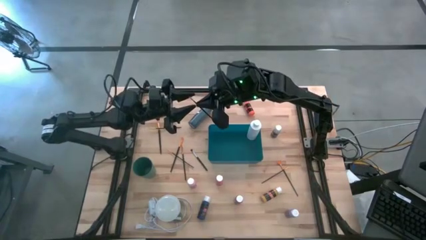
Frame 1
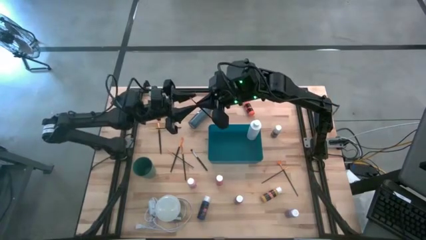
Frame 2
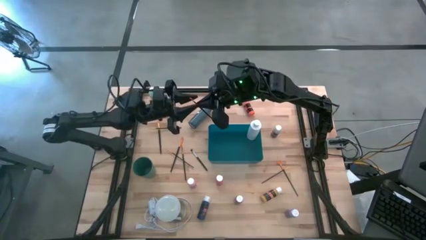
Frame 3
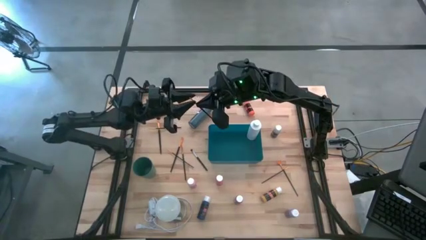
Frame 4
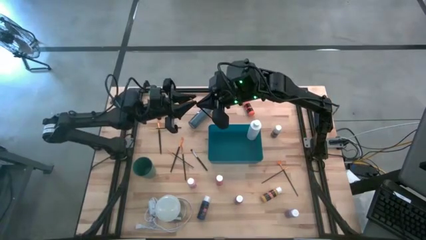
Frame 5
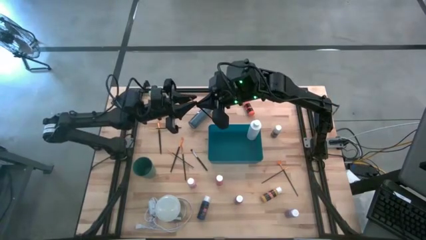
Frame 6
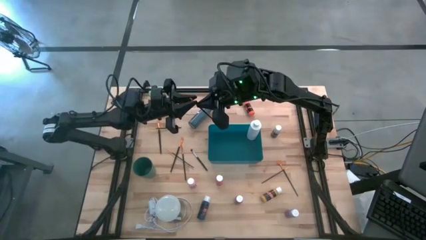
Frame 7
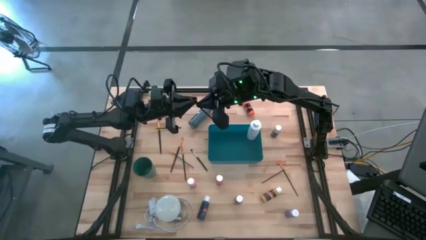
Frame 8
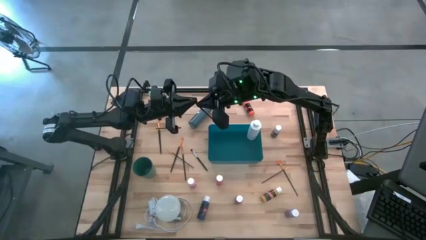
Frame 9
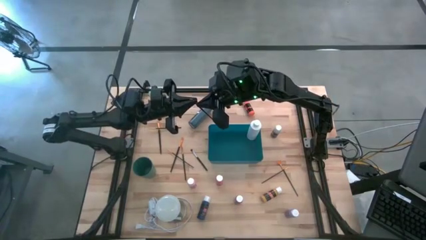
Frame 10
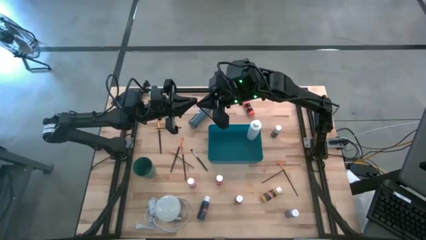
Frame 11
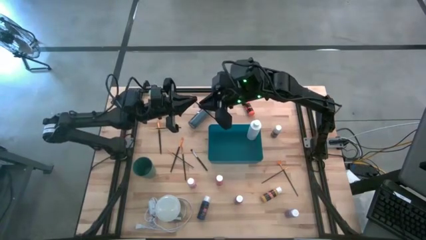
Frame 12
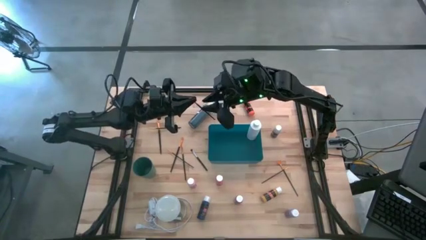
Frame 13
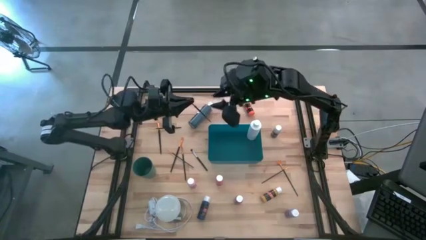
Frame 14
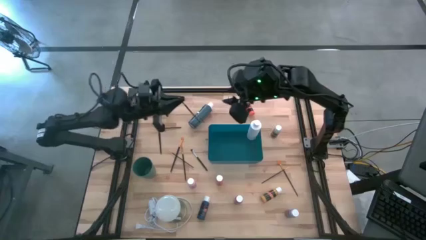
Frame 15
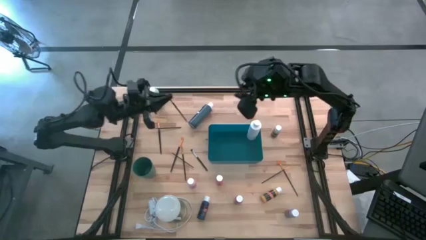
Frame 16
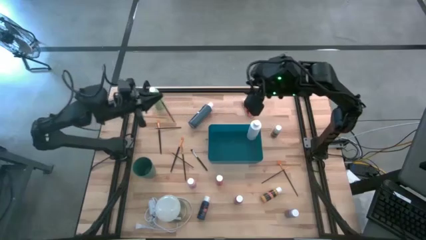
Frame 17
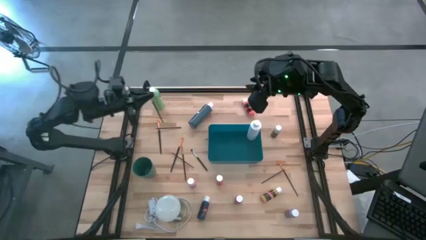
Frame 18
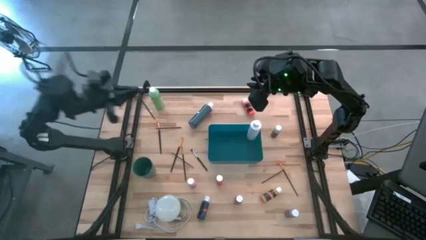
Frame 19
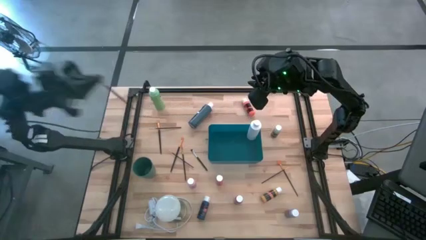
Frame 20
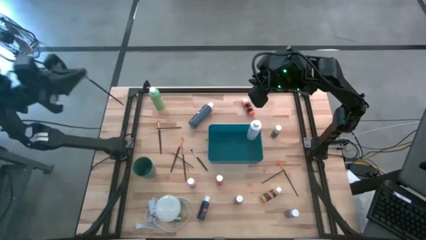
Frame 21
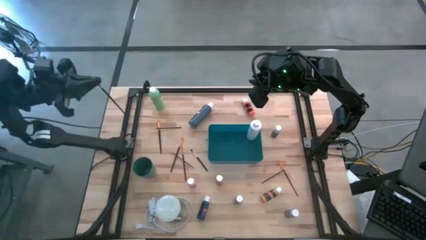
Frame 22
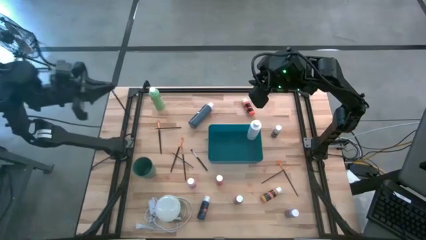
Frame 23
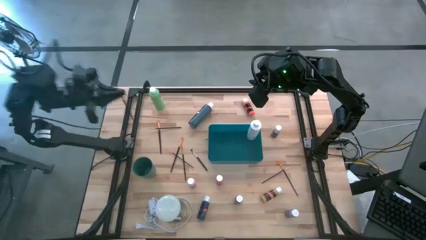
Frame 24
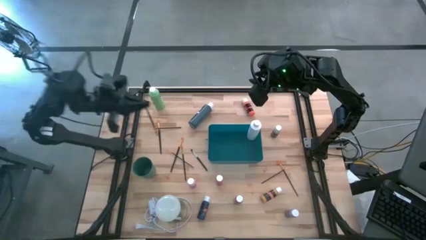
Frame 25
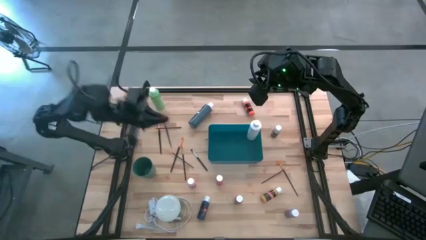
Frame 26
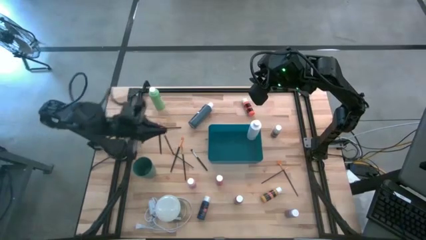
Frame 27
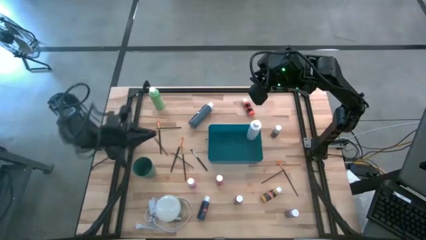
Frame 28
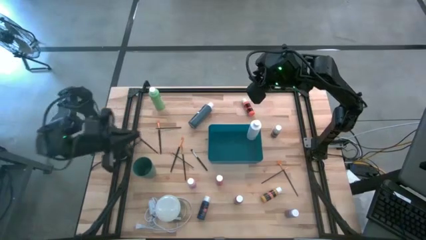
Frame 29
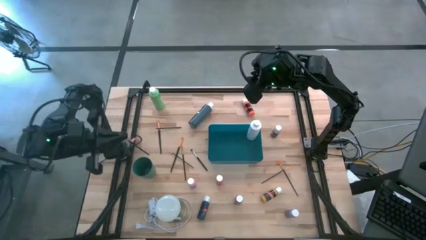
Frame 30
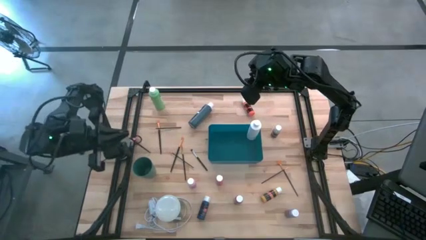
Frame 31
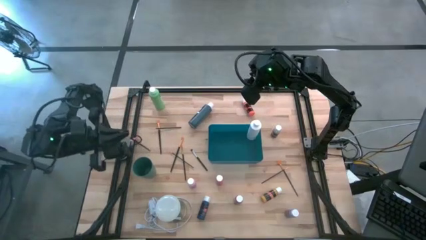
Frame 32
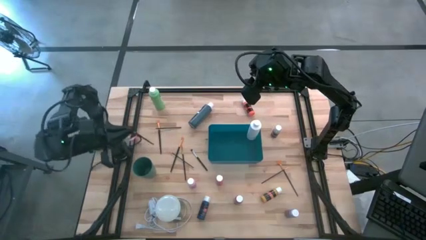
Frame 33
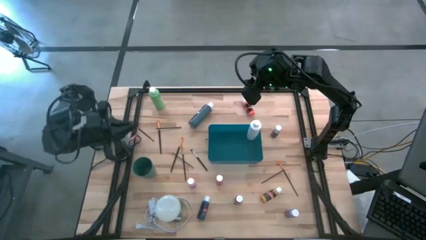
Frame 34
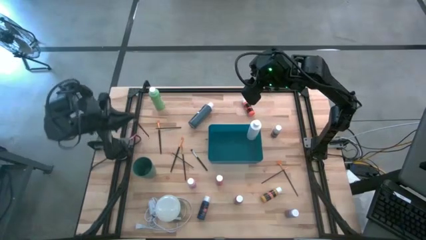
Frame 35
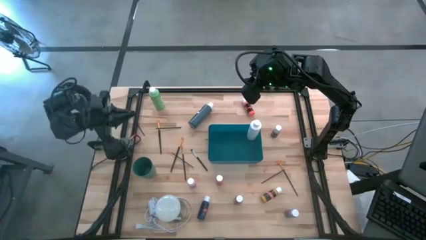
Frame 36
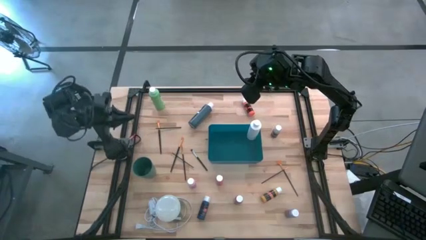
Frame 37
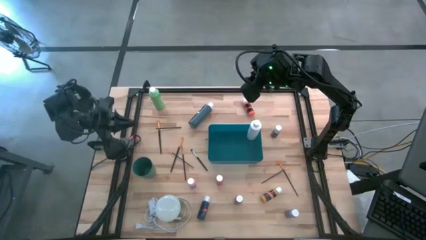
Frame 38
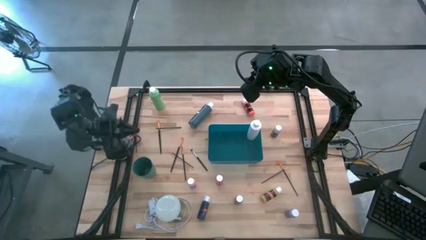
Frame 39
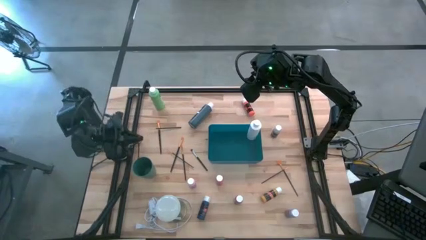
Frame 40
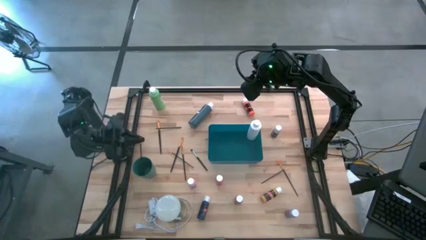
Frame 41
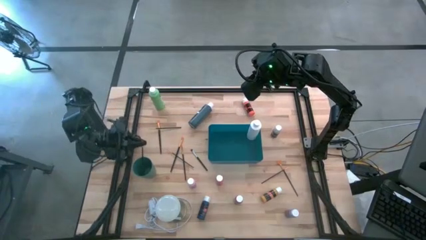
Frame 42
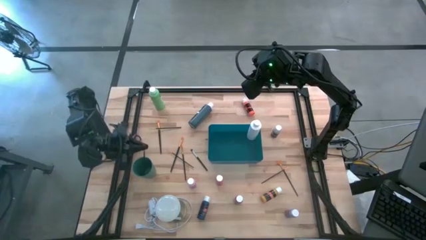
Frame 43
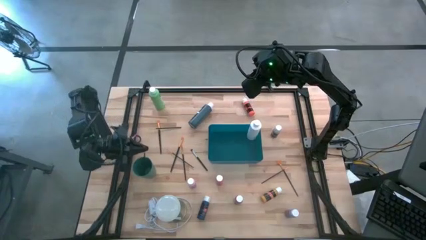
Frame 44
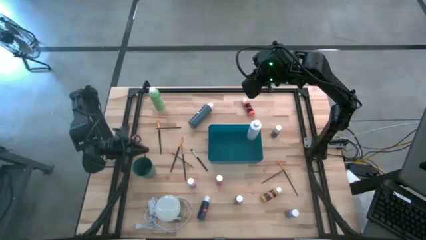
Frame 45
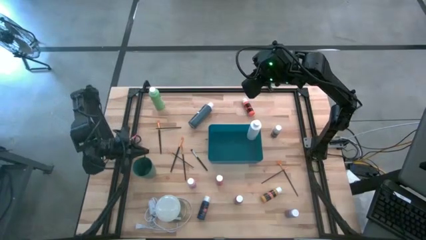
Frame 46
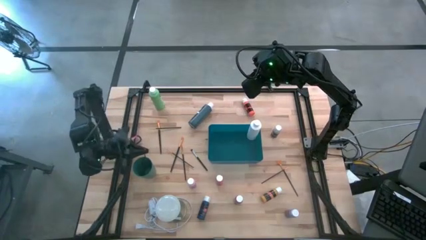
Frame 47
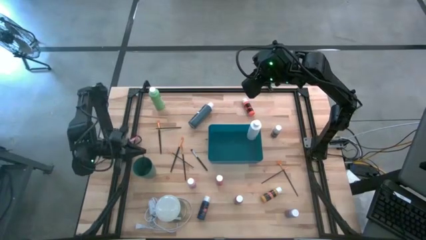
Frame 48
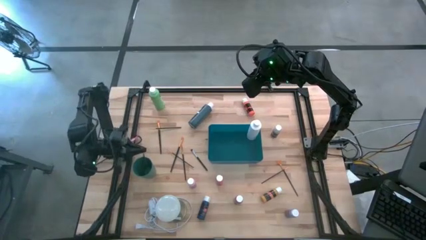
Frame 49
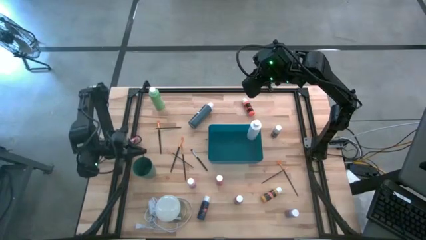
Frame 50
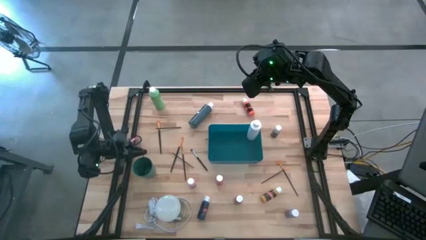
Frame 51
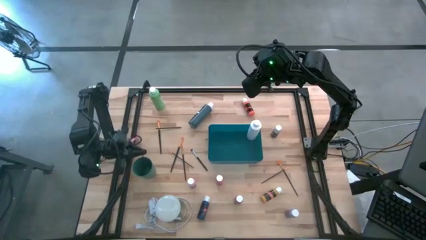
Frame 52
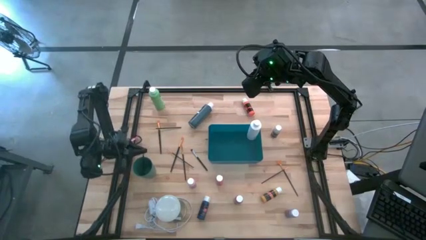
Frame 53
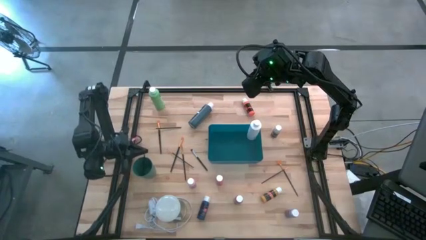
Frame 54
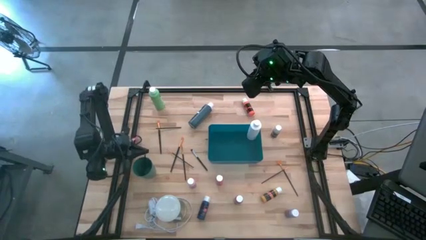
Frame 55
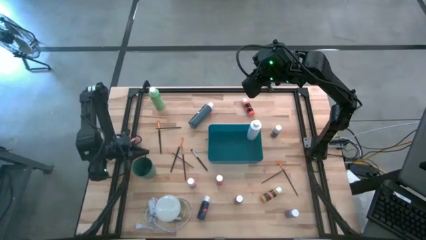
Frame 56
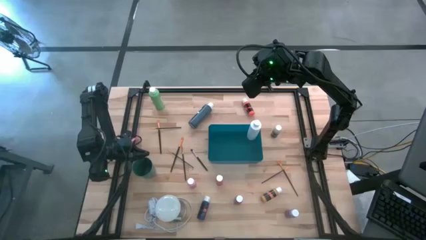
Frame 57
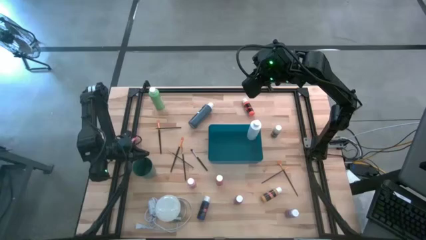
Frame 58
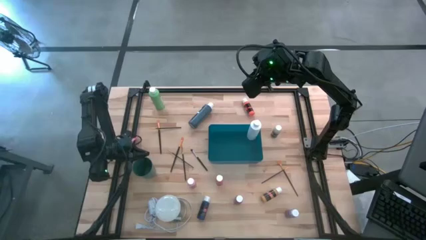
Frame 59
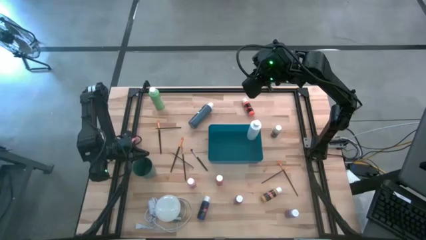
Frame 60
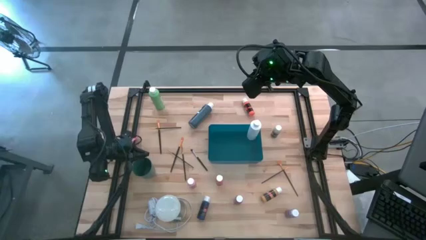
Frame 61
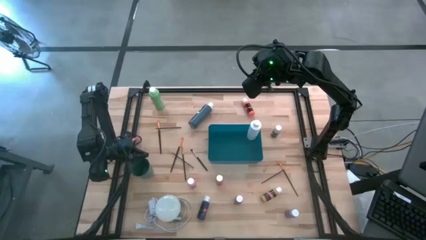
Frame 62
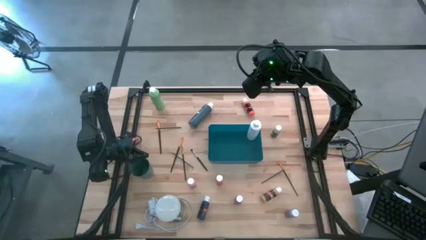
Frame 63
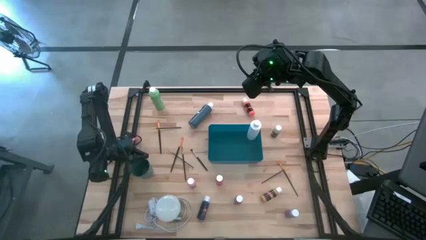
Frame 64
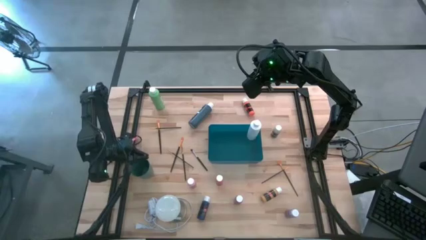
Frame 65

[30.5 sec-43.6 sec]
Task: Pick & Place Paint Supplies
Put the gold paintbrush into the green cup

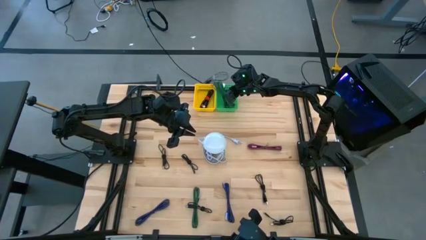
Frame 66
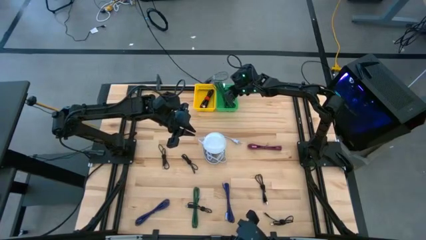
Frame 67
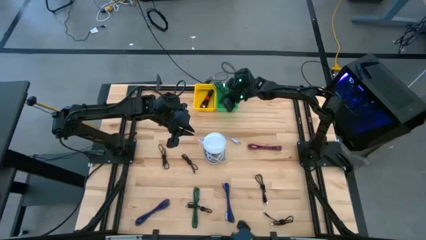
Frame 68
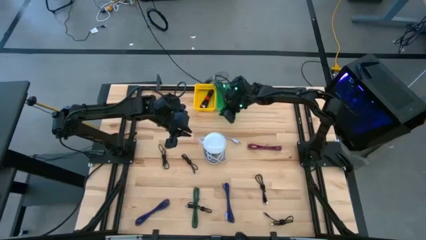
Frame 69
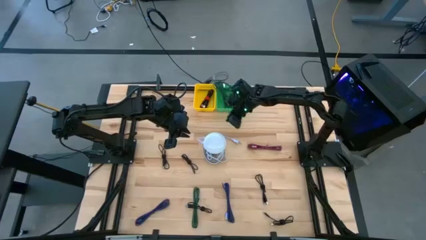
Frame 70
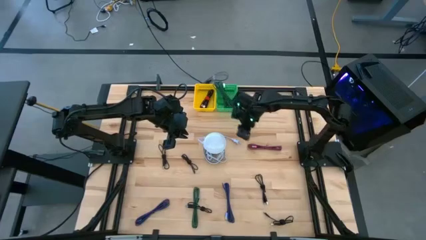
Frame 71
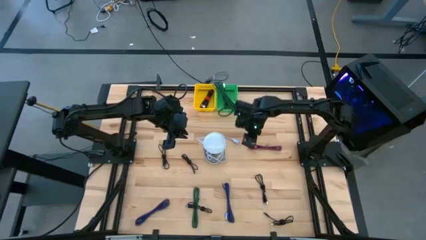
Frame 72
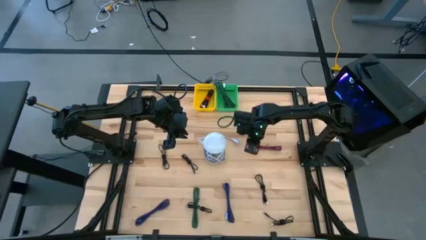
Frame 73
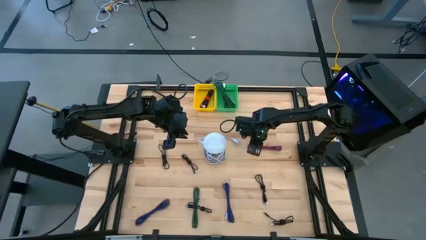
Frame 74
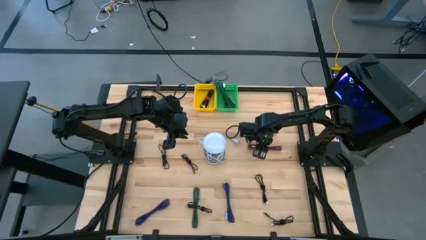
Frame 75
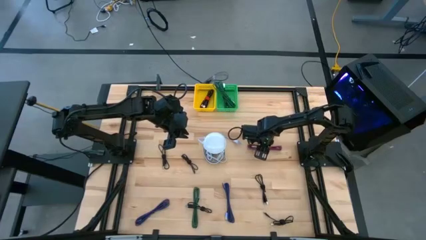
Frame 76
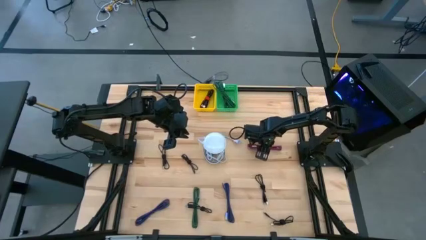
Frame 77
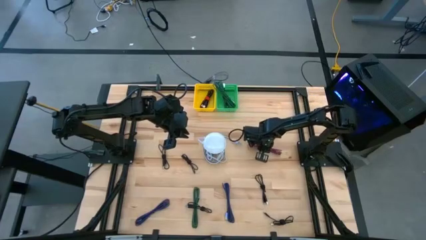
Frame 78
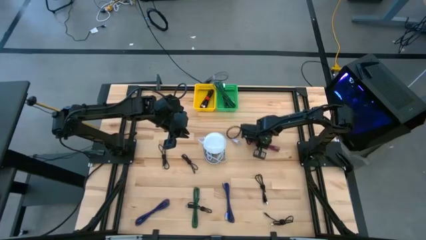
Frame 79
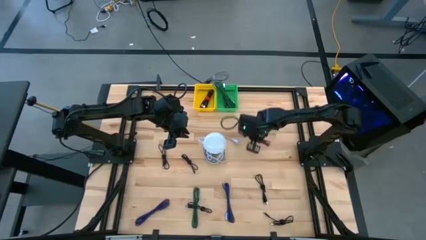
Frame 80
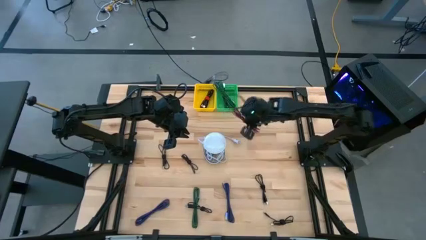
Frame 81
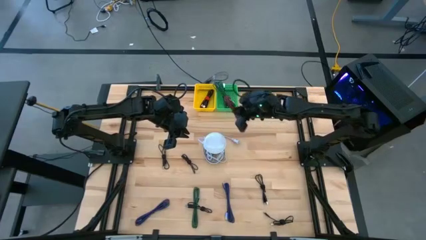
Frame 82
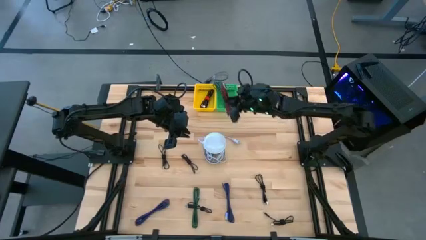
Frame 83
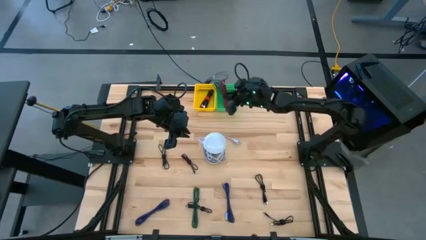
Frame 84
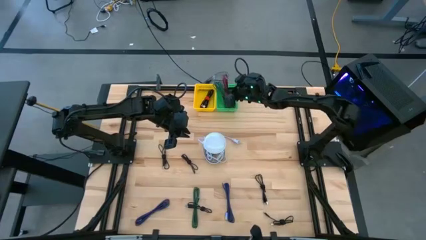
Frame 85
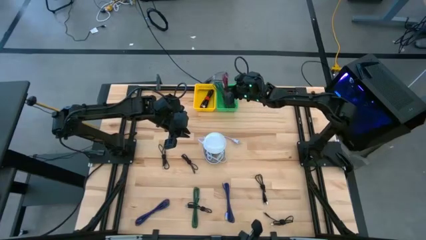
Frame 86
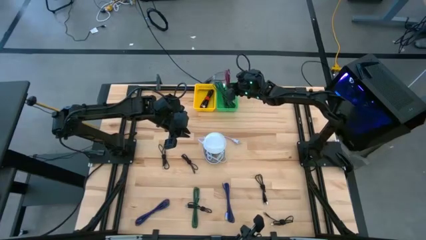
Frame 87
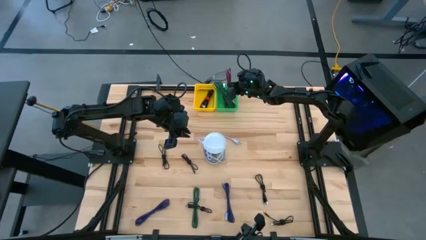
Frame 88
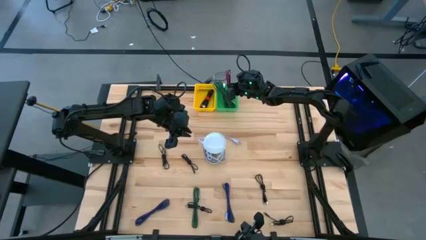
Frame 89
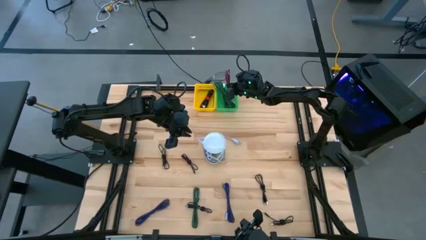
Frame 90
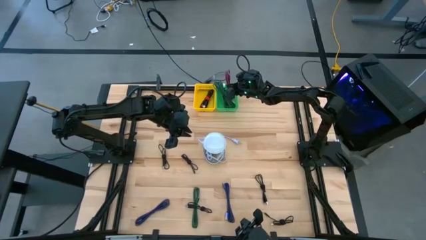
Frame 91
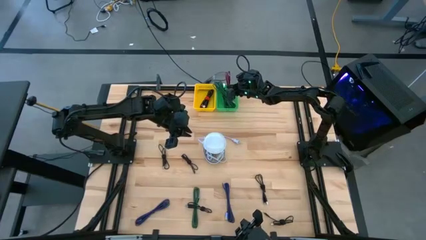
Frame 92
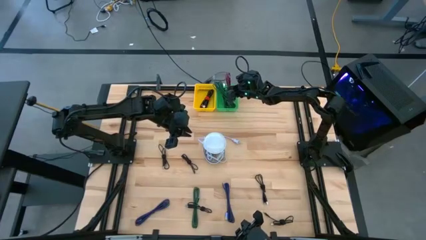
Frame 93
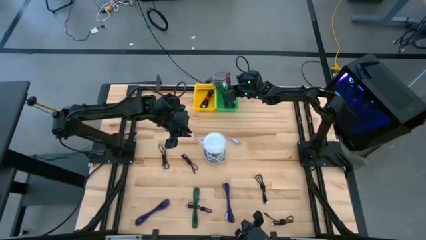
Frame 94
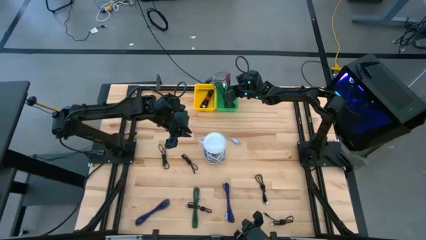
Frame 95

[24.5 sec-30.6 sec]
Task: Pick & Place USB Port
Put the pink charger cable into the green bin
